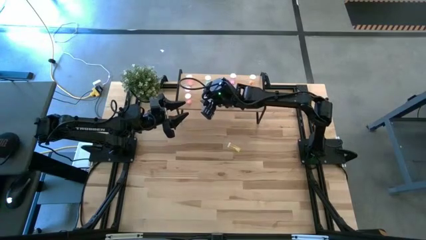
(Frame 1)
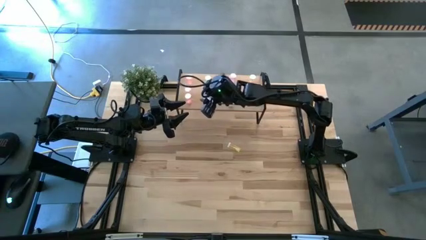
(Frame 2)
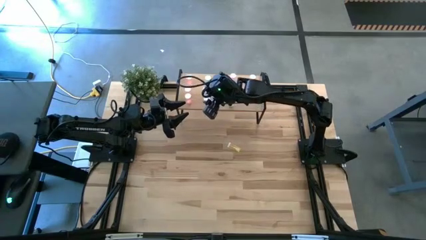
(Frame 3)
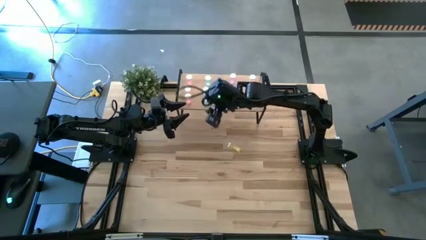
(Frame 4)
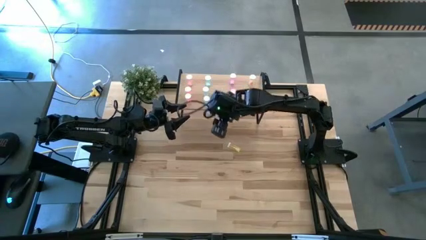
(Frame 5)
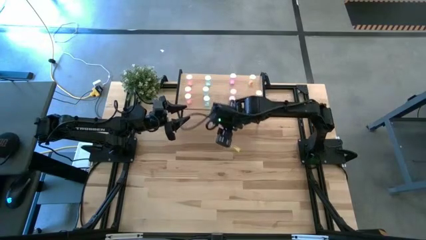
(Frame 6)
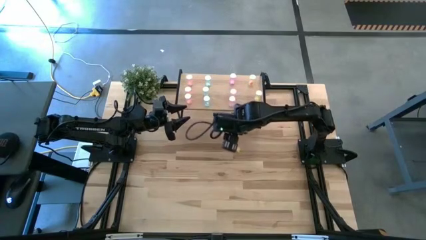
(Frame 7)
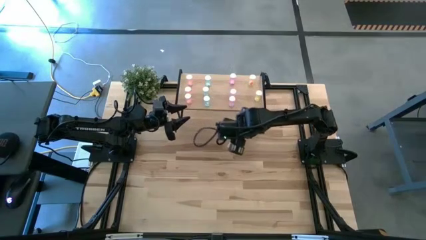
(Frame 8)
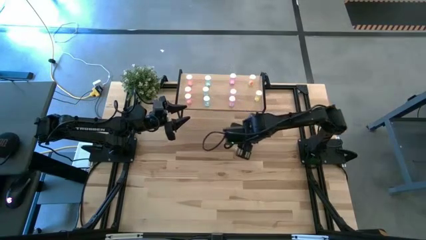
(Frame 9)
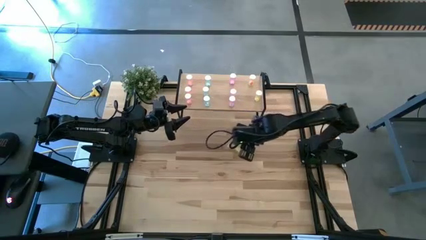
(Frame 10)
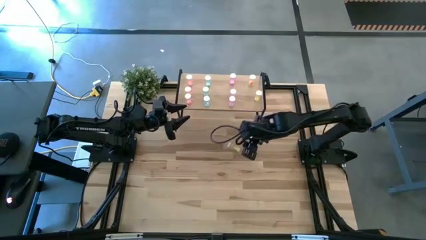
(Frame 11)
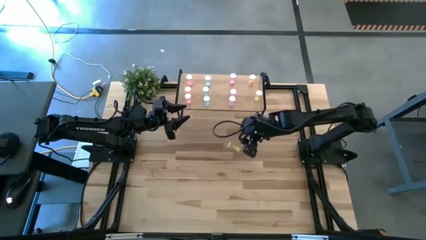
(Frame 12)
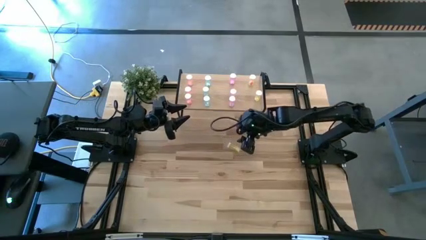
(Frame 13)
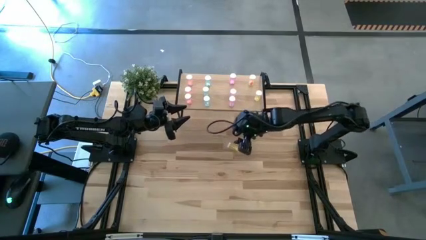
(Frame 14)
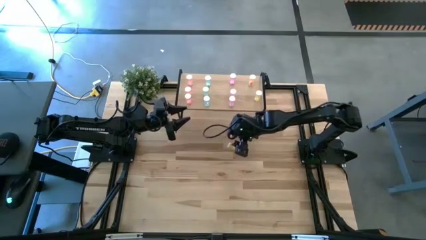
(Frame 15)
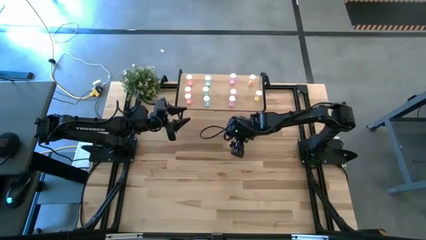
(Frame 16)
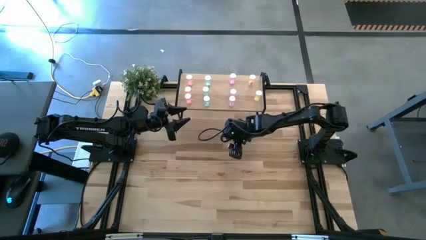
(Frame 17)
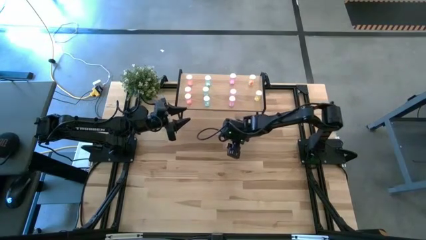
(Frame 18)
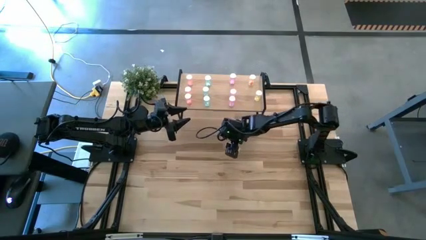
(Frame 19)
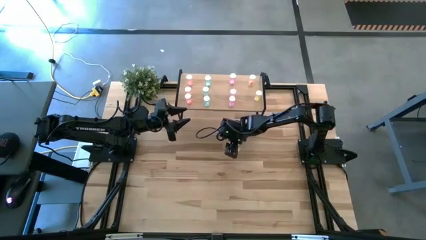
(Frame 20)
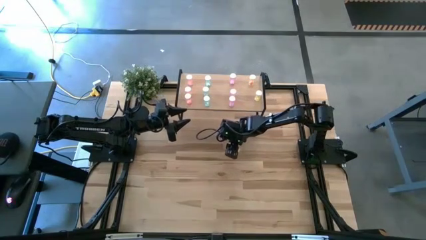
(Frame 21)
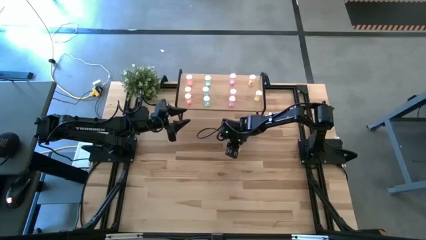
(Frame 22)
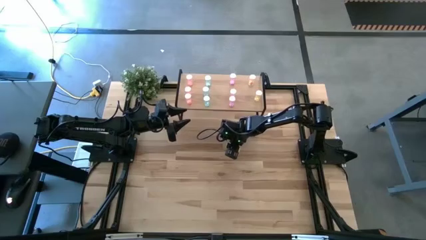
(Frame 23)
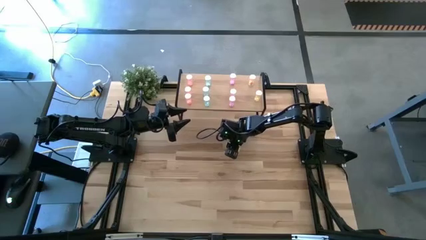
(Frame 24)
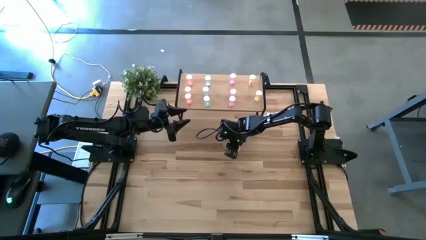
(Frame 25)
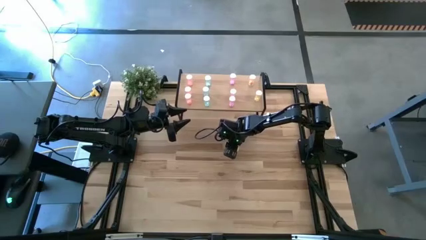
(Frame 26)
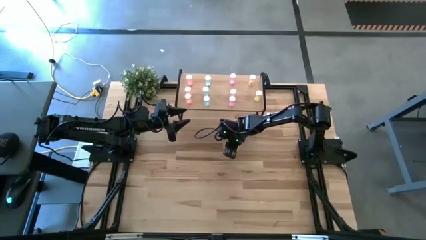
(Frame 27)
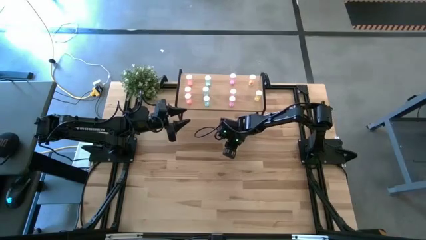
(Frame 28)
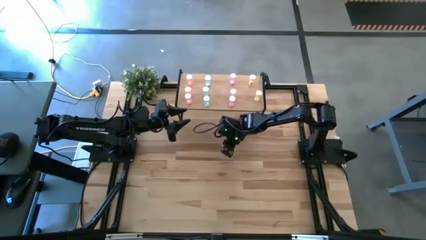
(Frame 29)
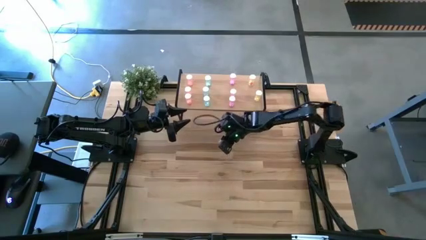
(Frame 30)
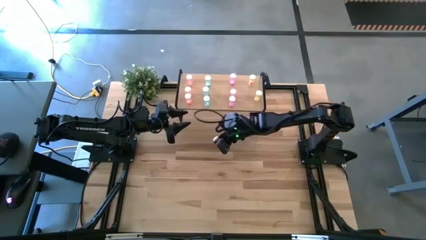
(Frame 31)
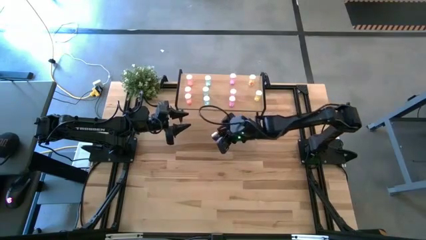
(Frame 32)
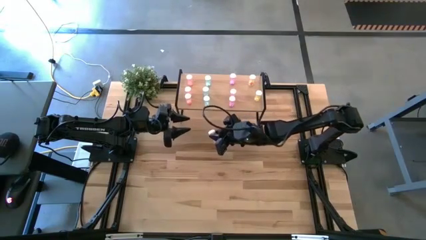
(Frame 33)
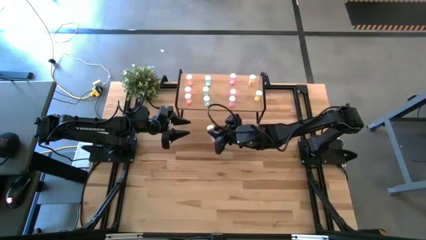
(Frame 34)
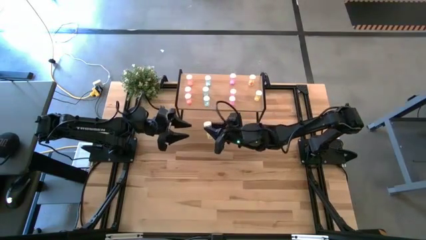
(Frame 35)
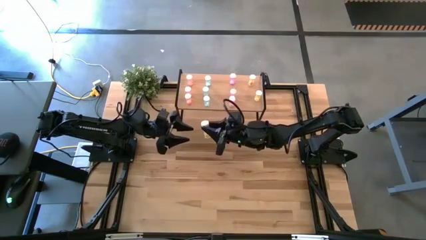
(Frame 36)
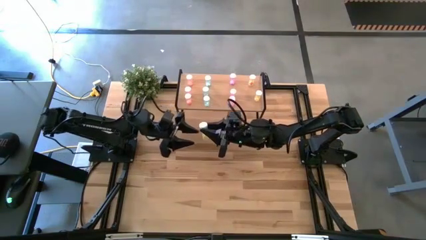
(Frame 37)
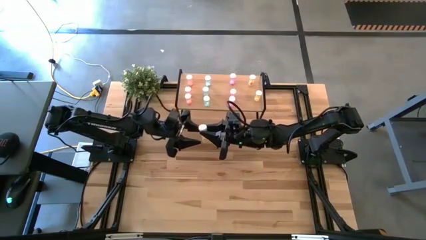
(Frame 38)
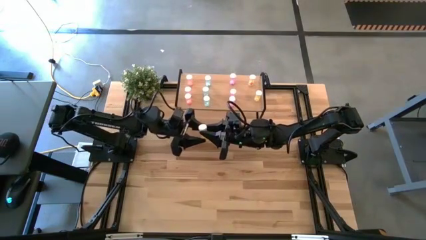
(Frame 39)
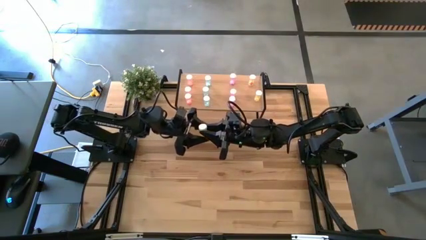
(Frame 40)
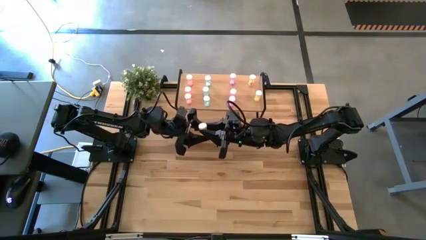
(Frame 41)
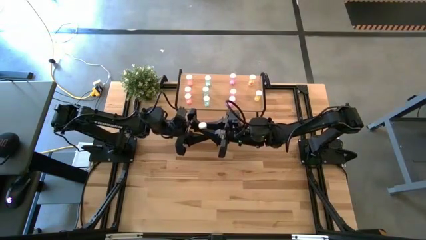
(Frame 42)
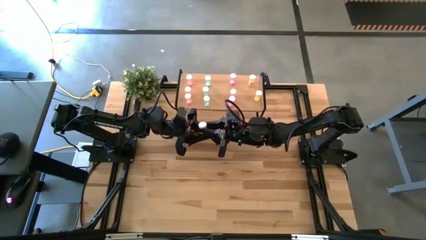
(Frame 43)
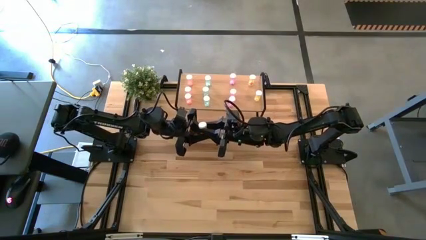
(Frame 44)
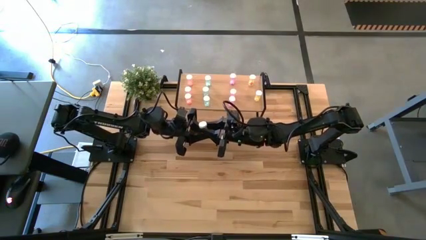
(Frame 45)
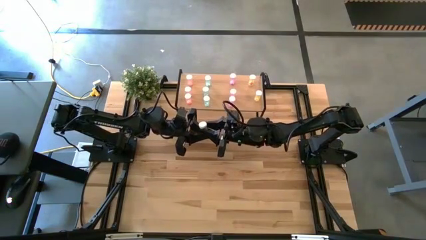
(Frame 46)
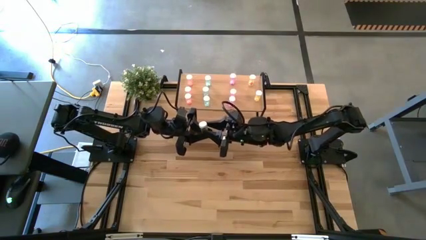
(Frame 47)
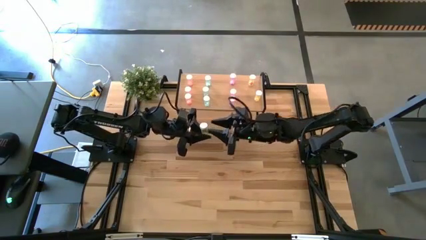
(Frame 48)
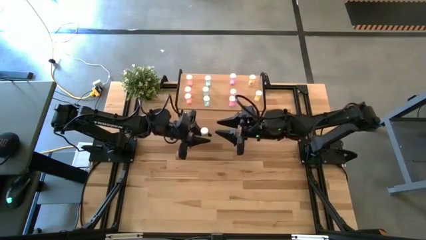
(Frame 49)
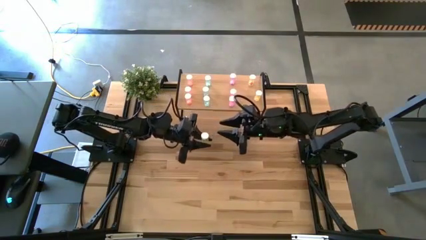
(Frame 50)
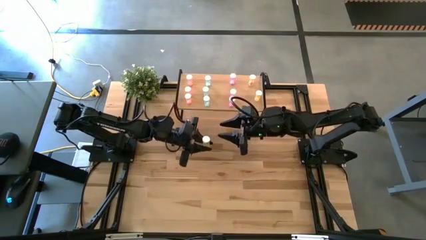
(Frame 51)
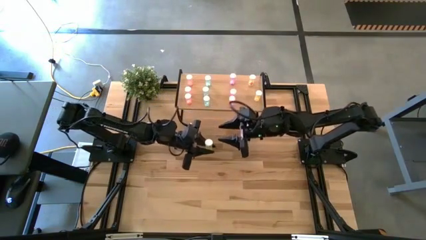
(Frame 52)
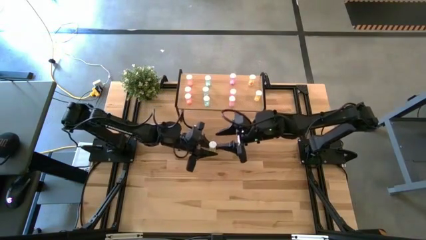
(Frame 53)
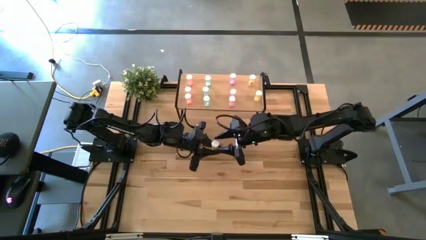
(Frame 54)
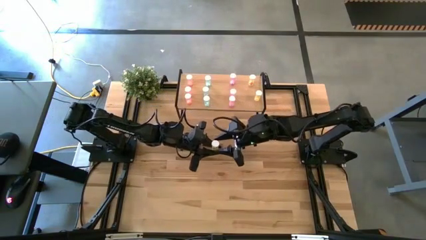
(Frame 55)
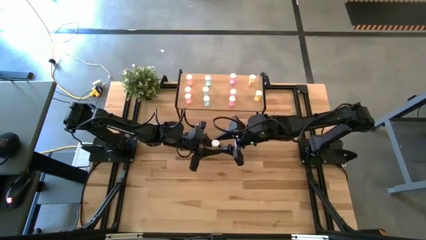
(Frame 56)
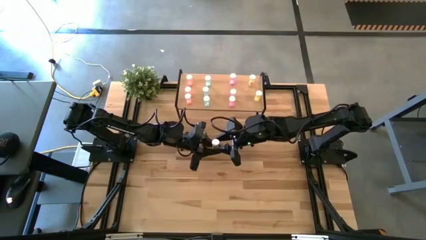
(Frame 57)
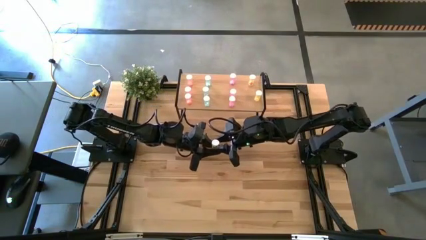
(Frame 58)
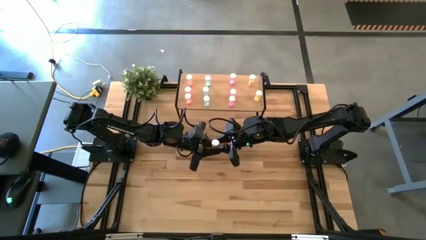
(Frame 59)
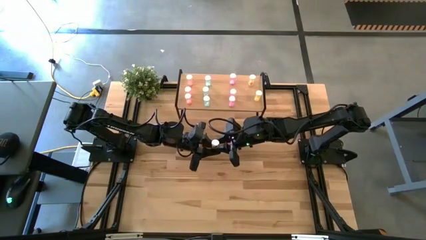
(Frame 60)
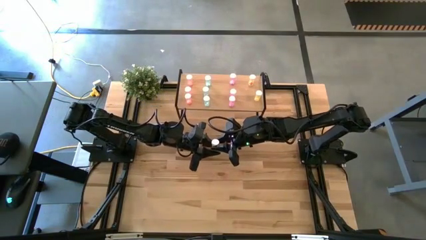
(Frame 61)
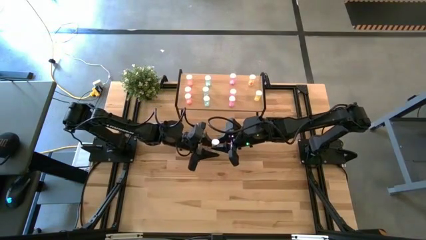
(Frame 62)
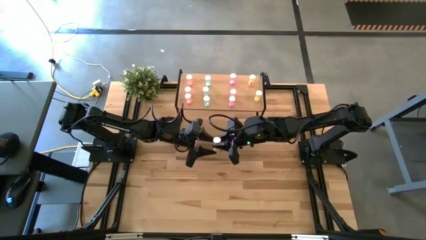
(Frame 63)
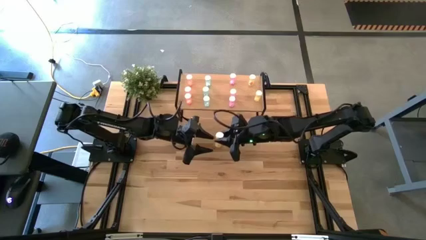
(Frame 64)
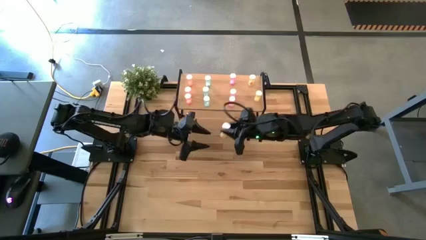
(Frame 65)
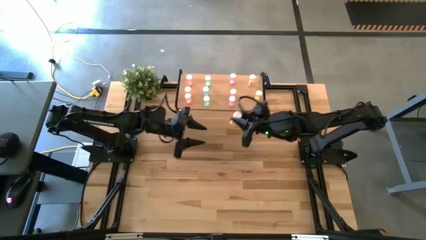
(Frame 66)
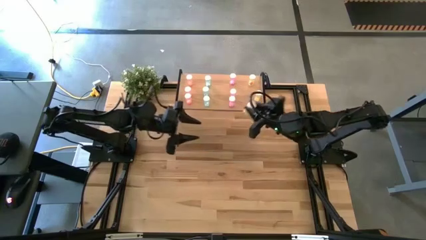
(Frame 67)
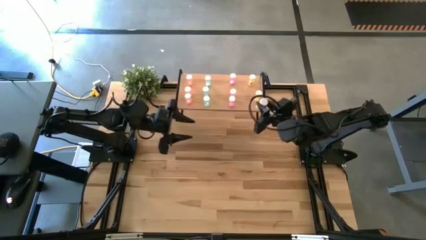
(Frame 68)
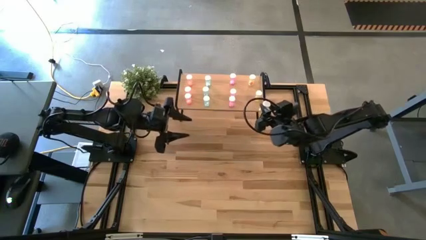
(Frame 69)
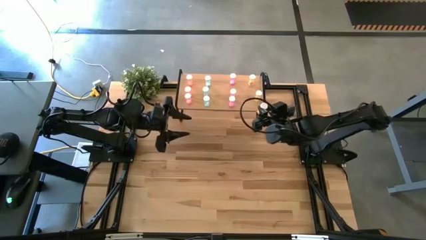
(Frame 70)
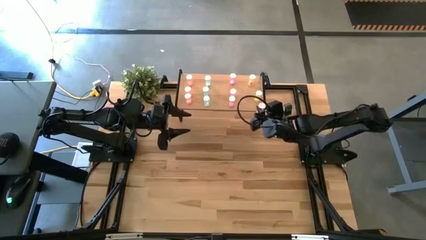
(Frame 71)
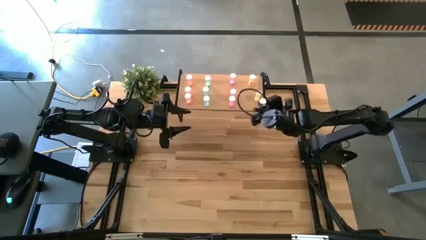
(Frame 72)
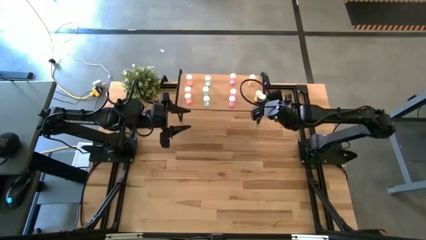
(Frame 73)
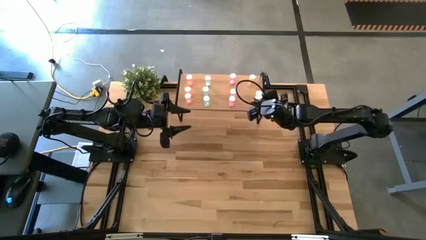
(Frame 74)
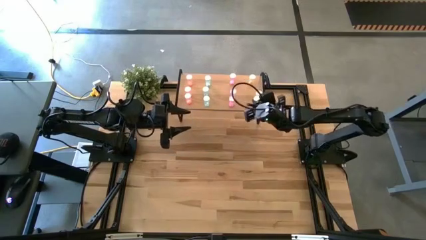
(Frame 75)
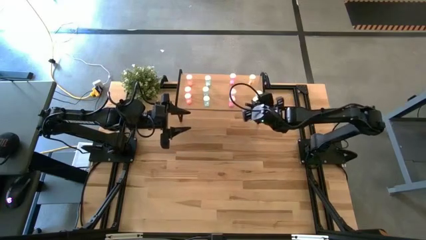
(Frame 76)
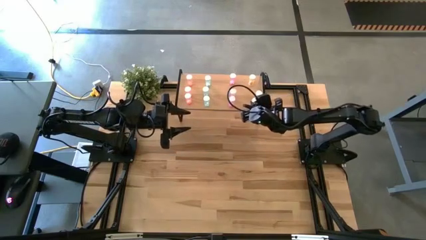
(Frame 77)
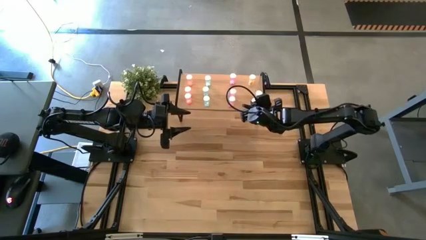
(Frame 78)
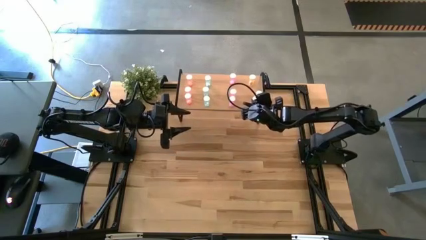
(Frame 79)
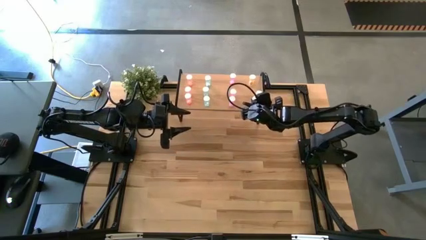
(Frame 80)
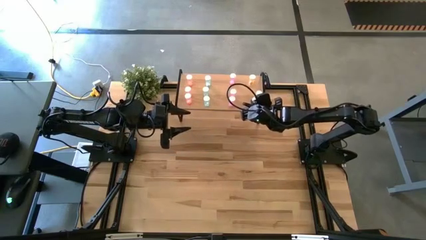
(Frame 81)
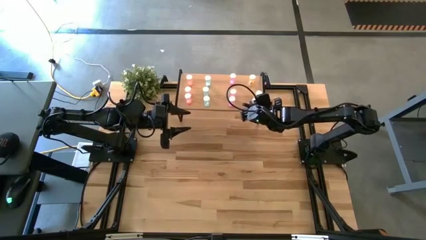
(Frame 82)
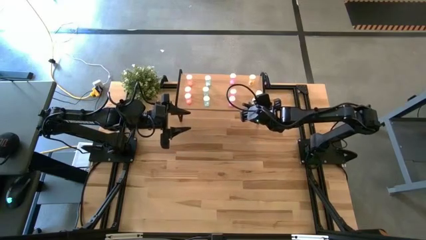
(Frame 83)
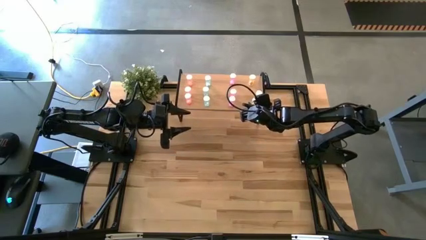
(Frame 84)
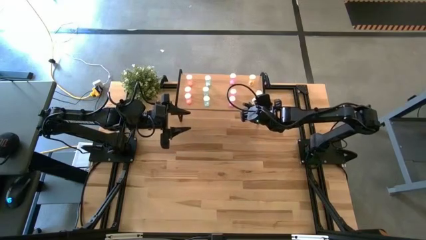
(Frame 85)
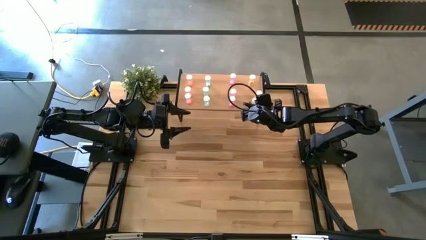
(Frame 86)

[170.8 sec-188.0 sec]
Task: Pick and place medicine bottles onto shelf by color
Put the yellow pill bottle on the shelf aligned with the other yellow pill bottles
